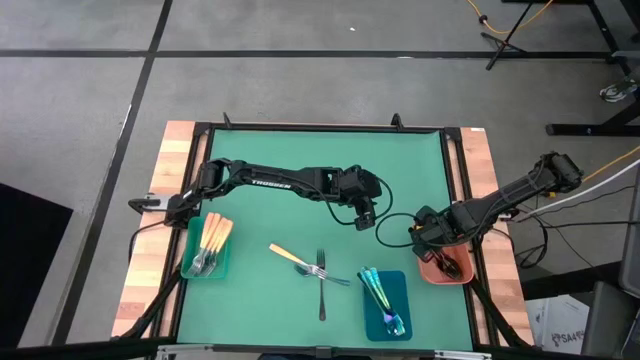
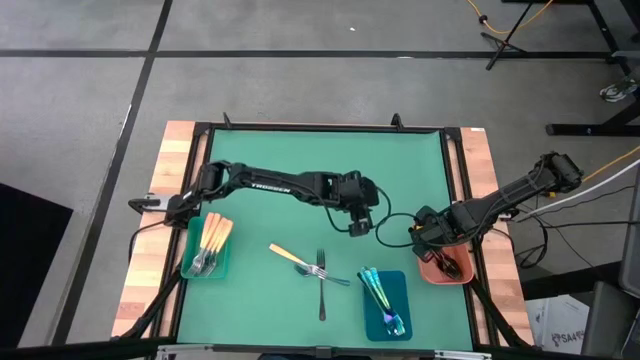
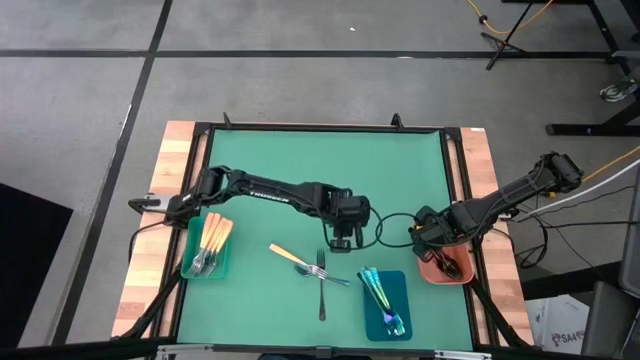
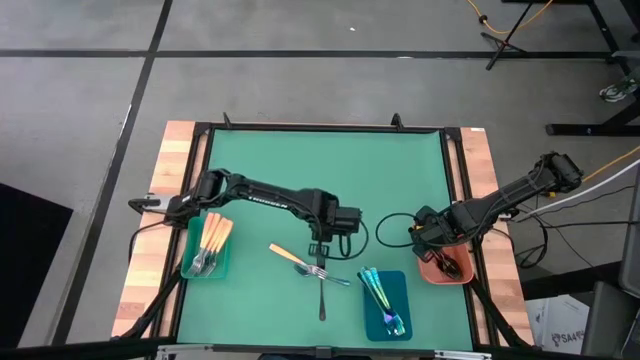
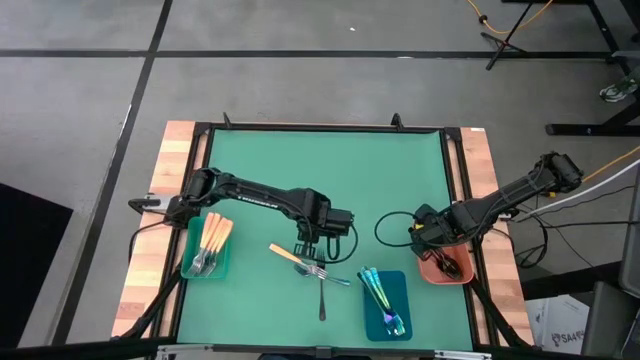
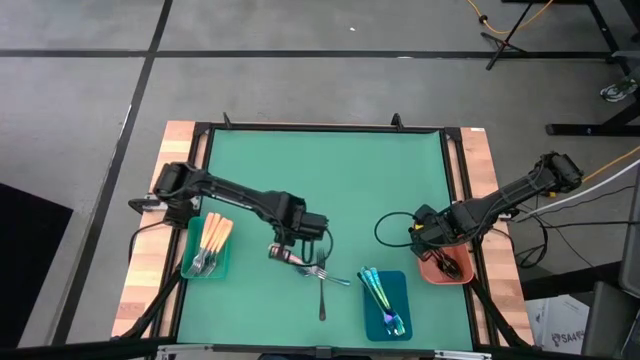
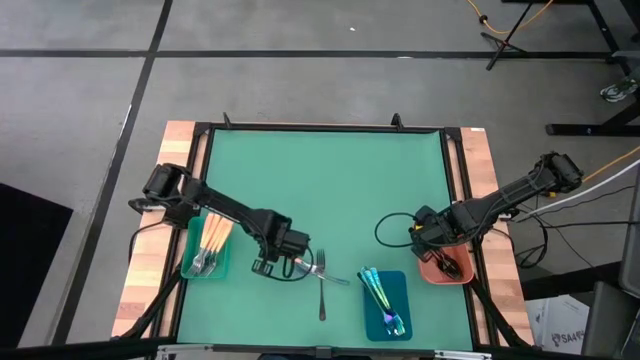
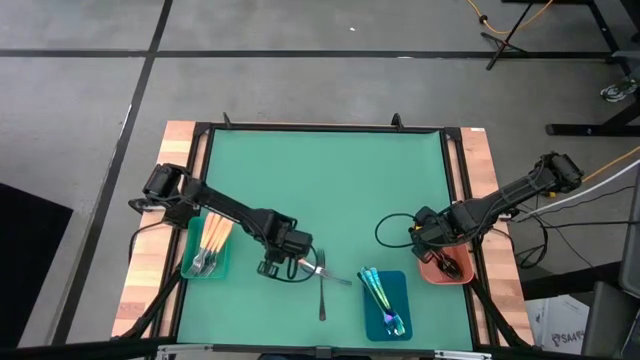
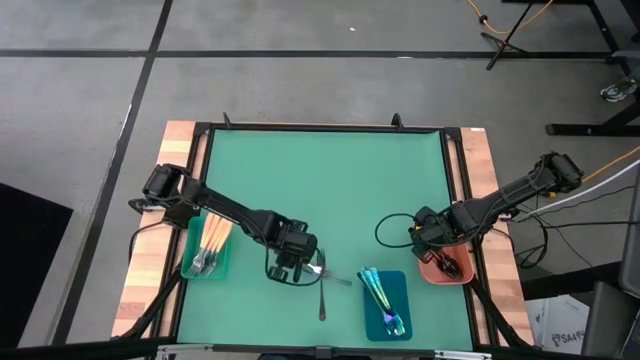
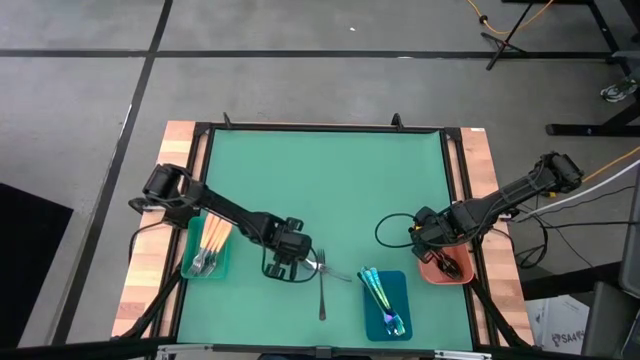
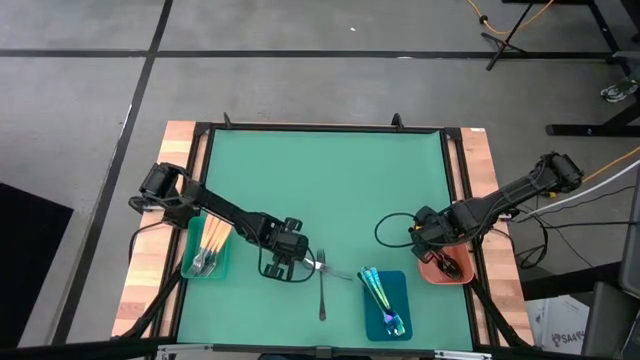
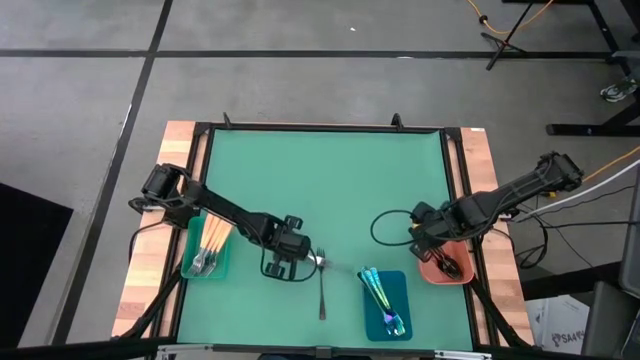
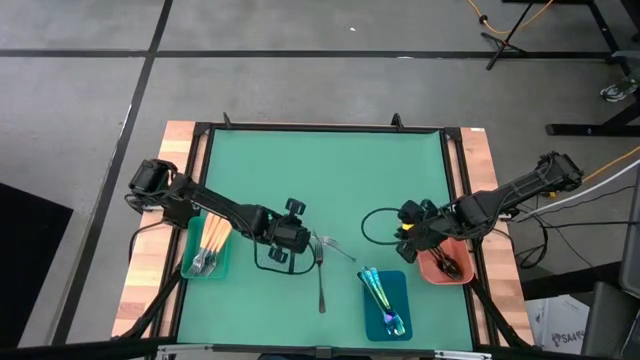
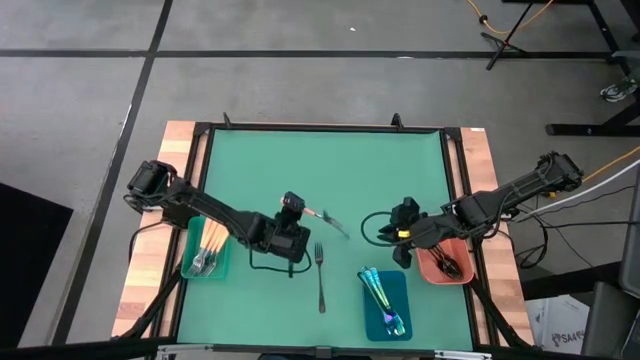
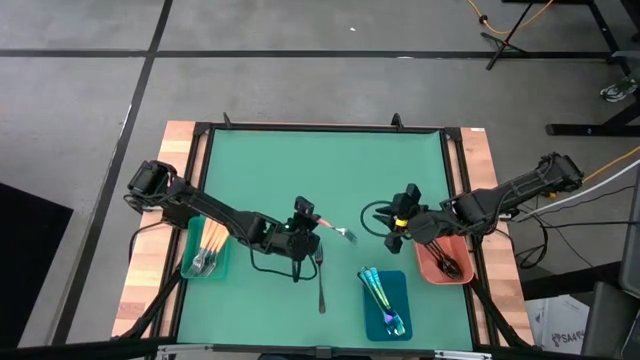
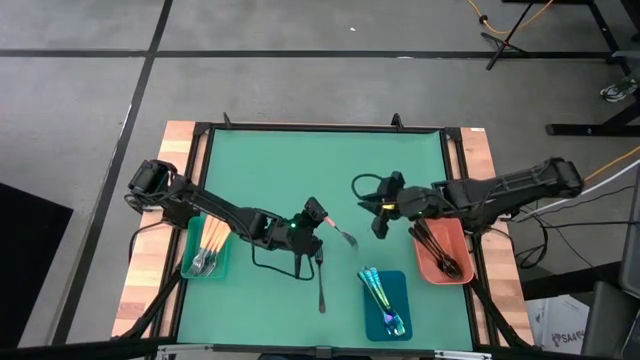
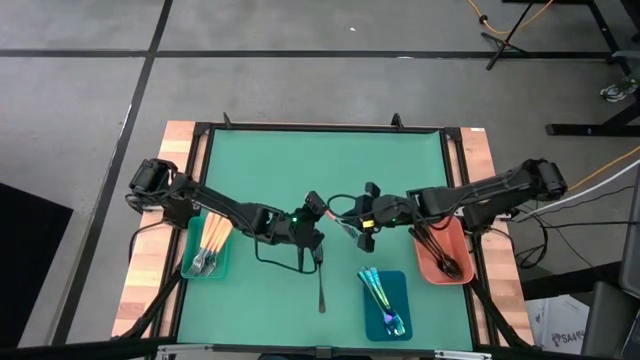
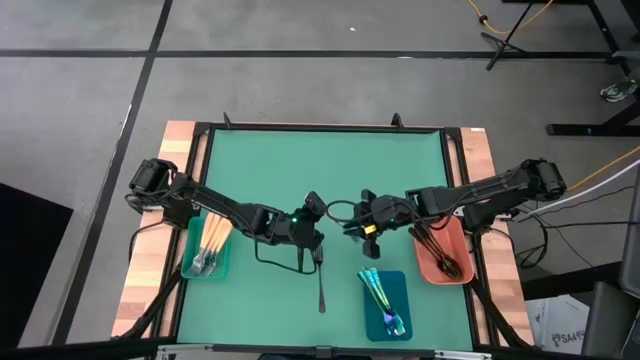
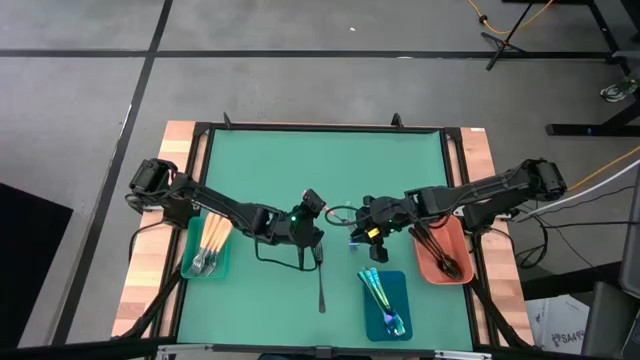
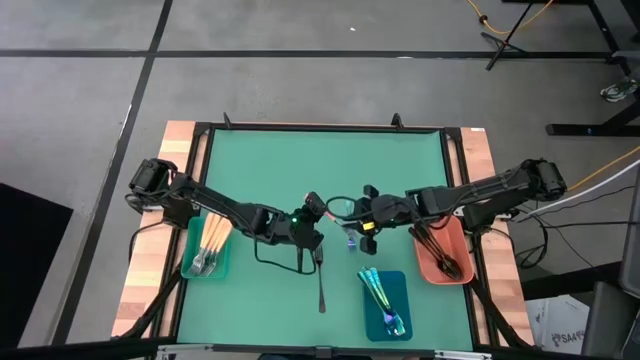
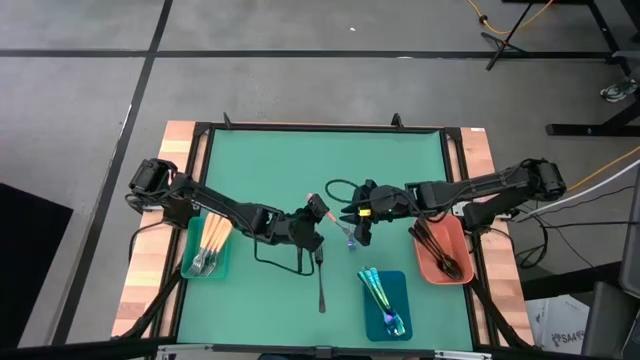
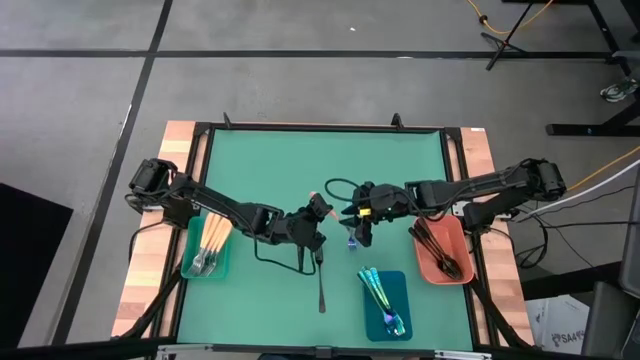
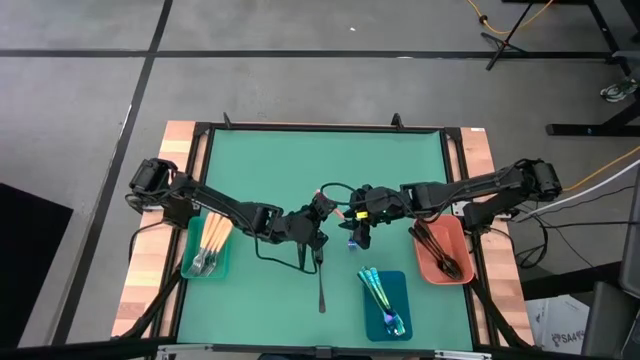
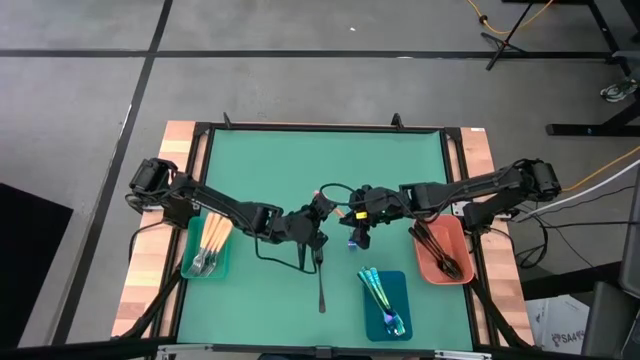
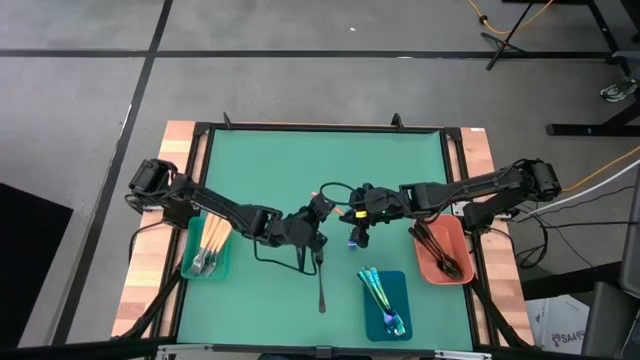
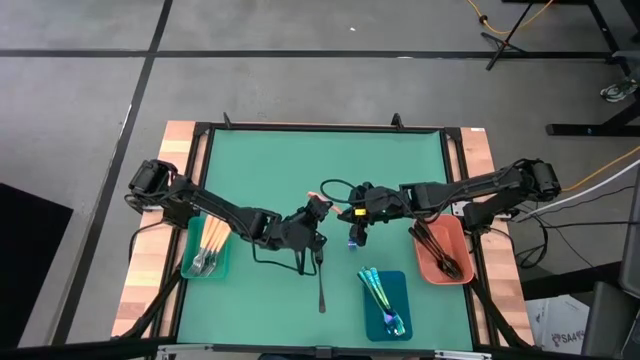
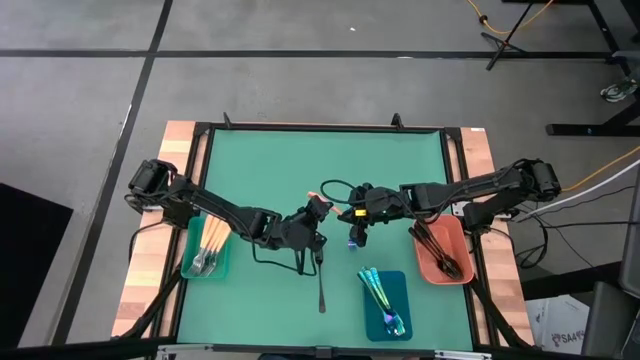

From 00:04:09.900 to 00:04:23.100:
Task: Sort silverware by color (type)
Put the yellow fork into the green bin

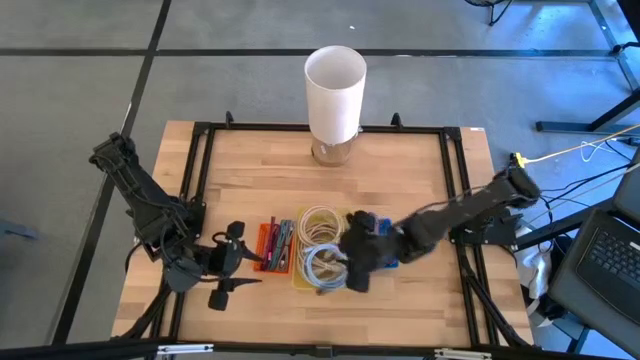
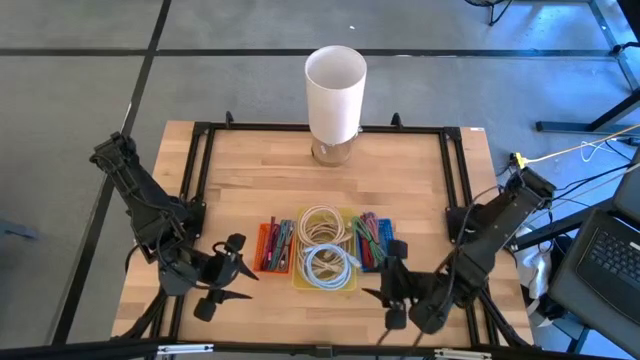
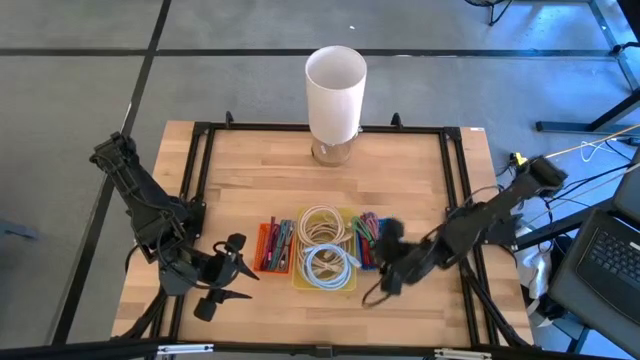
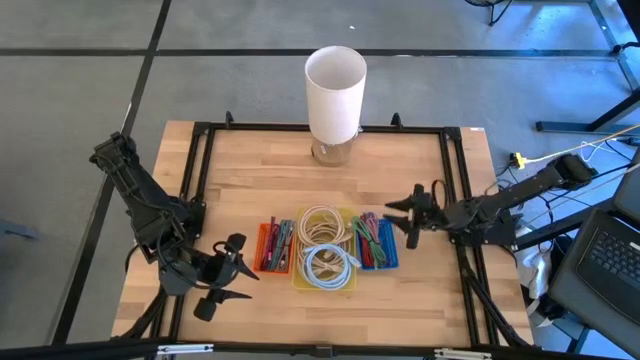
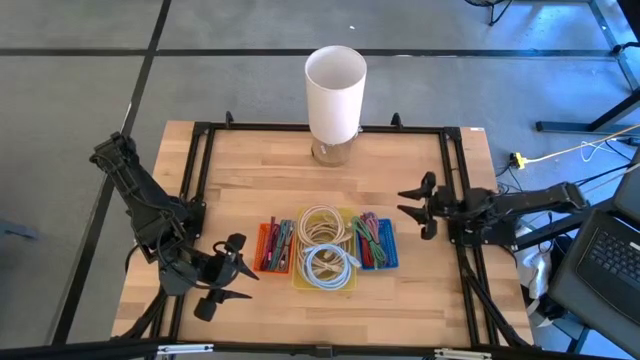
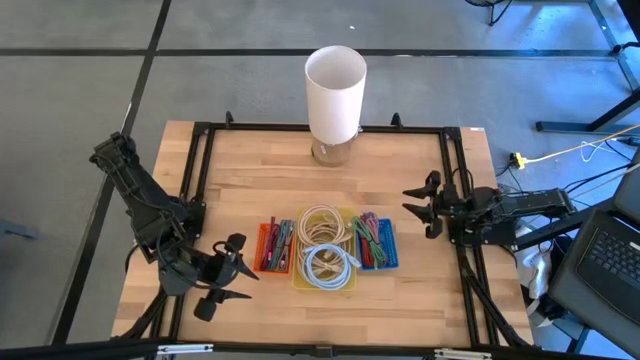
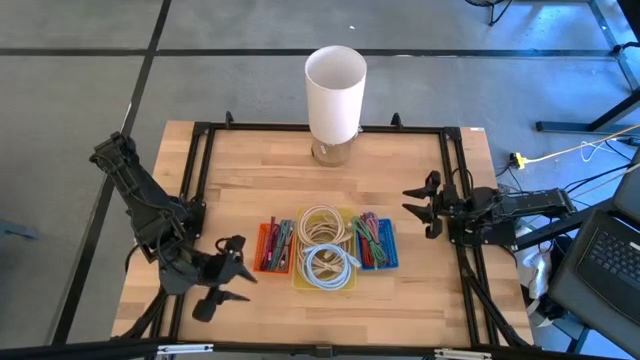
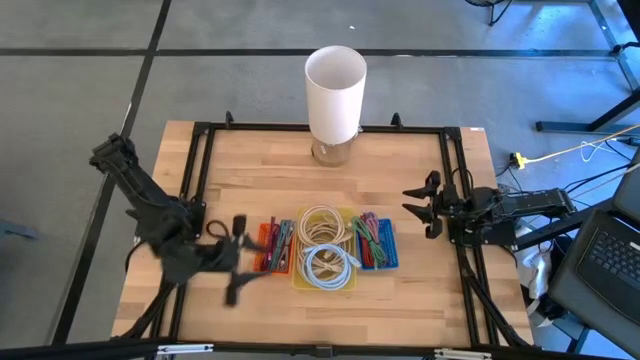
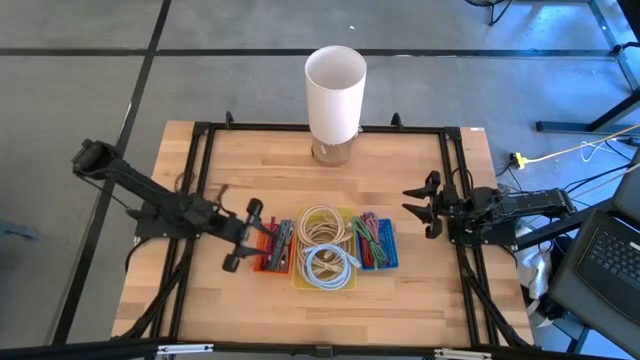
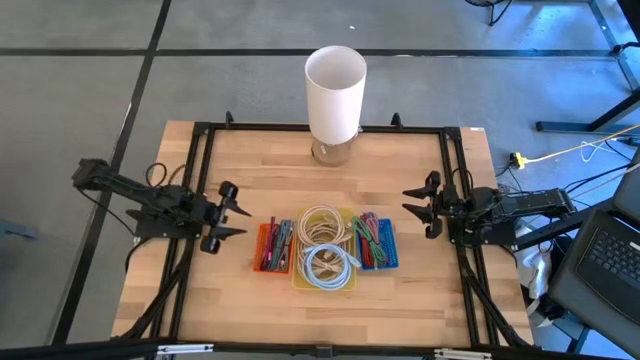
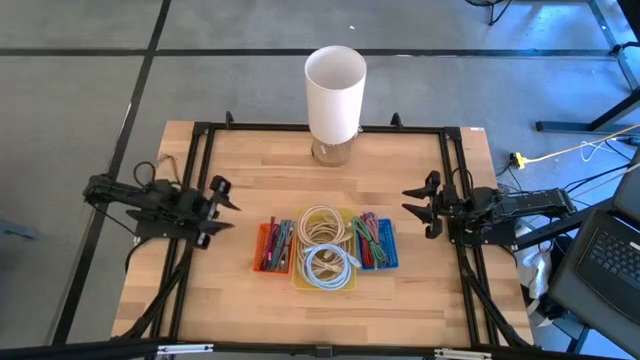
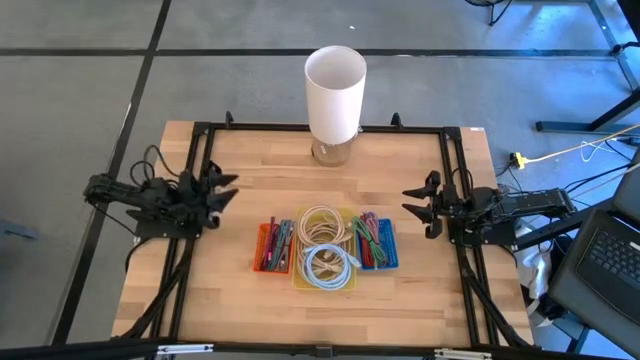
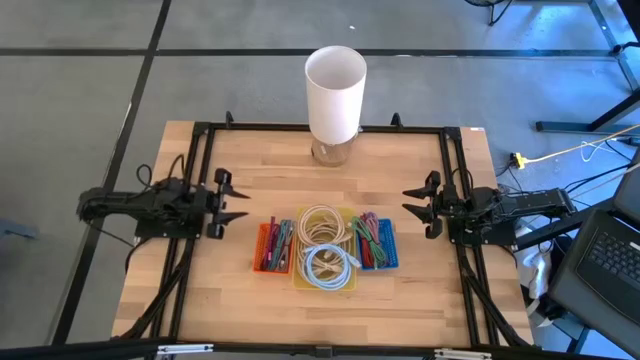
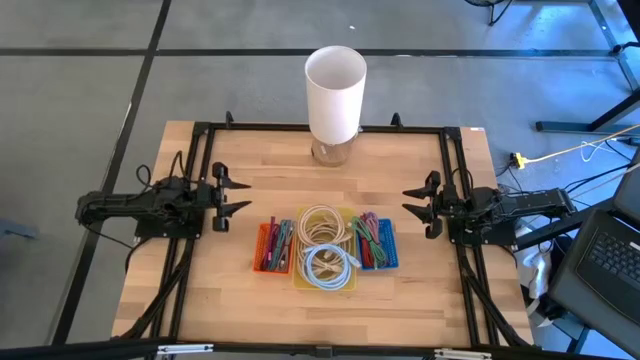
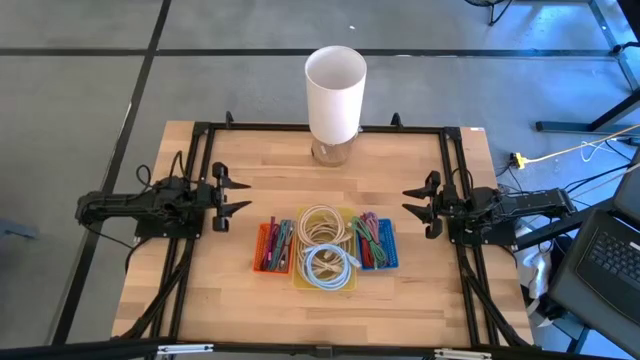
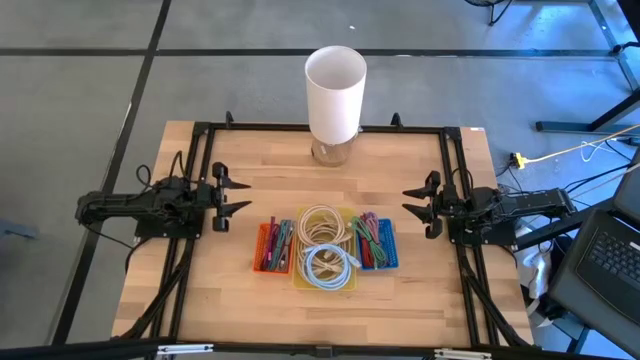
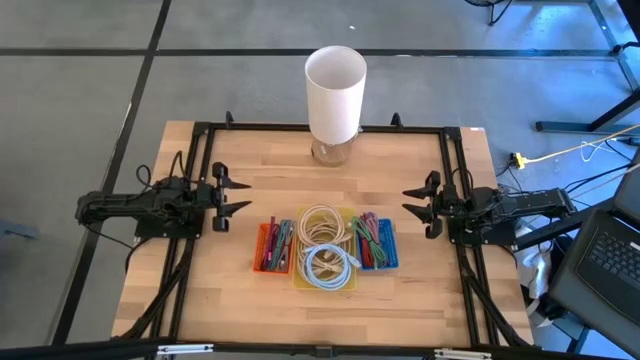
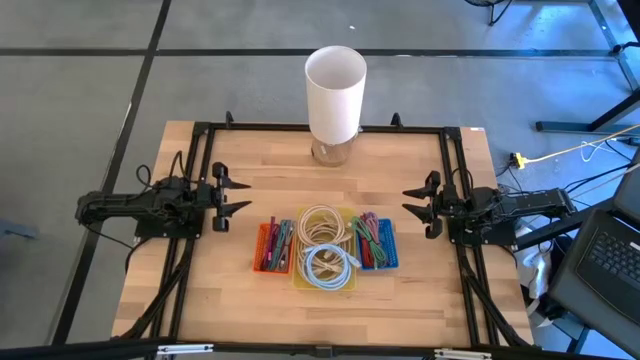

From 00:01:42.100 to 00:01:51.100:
Task: Pick & Place USB Port
Return to Home Position
